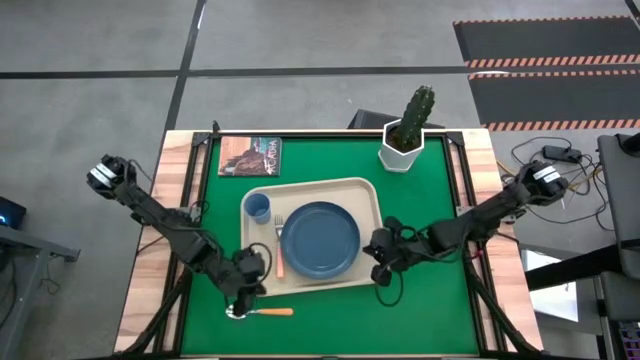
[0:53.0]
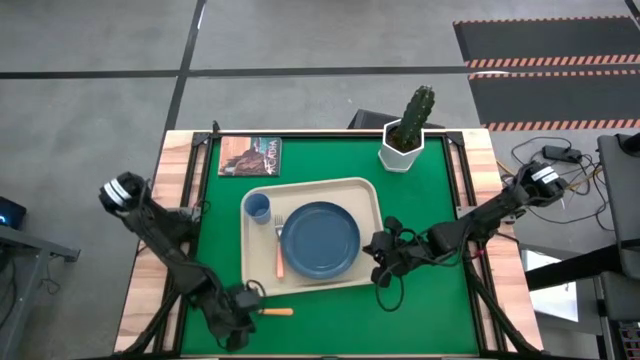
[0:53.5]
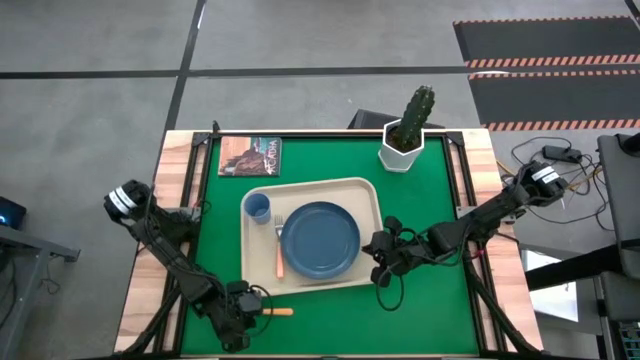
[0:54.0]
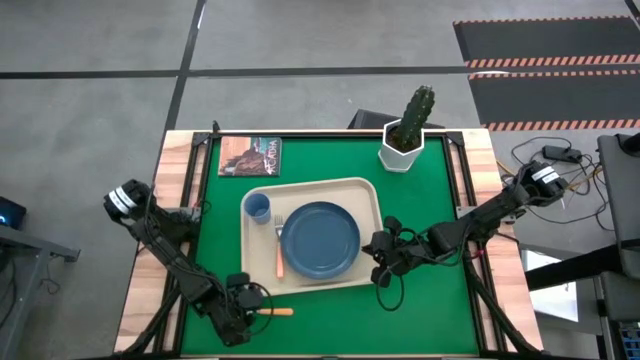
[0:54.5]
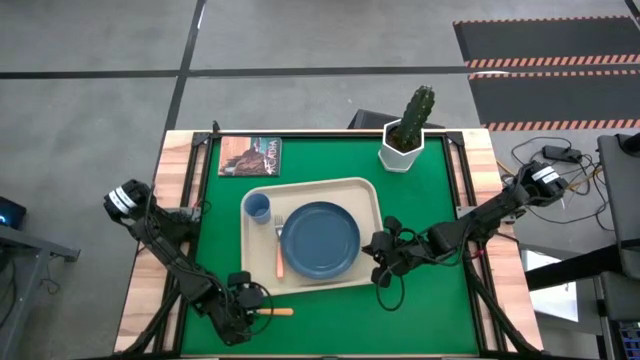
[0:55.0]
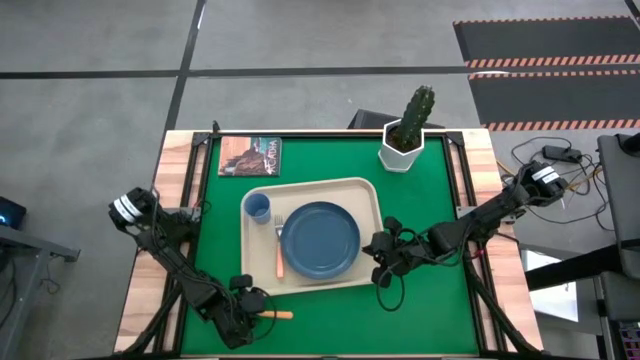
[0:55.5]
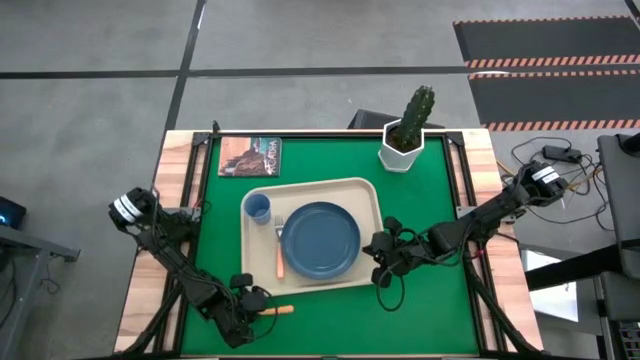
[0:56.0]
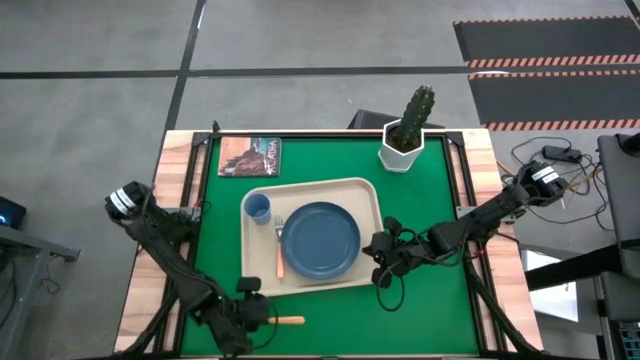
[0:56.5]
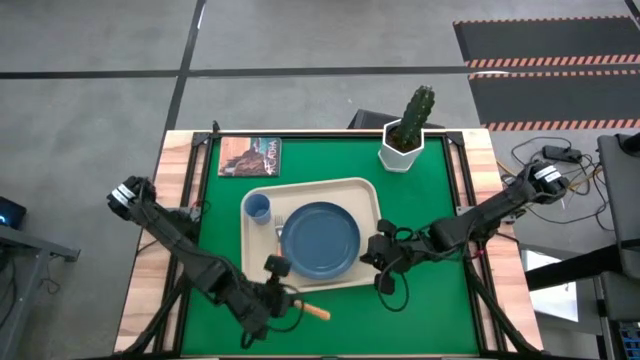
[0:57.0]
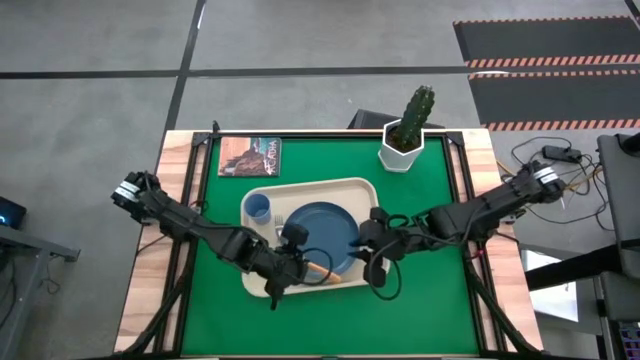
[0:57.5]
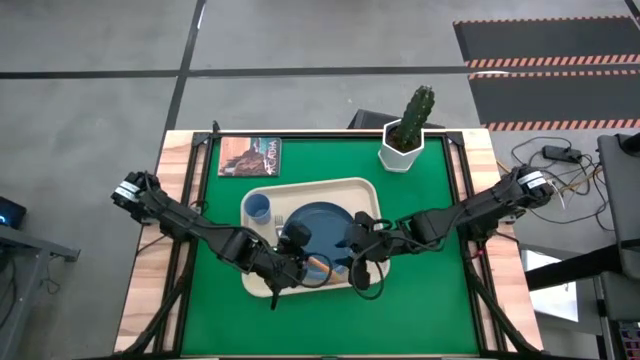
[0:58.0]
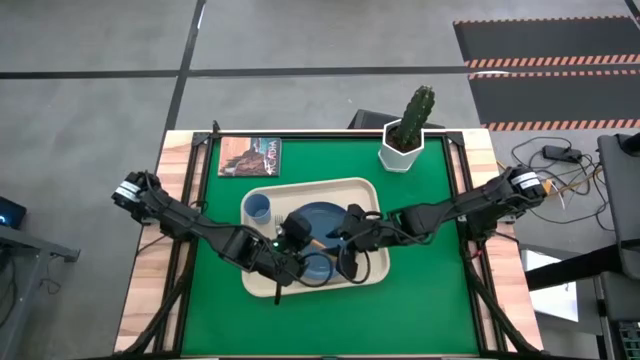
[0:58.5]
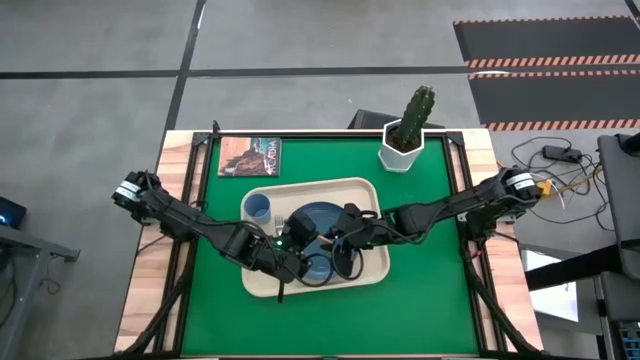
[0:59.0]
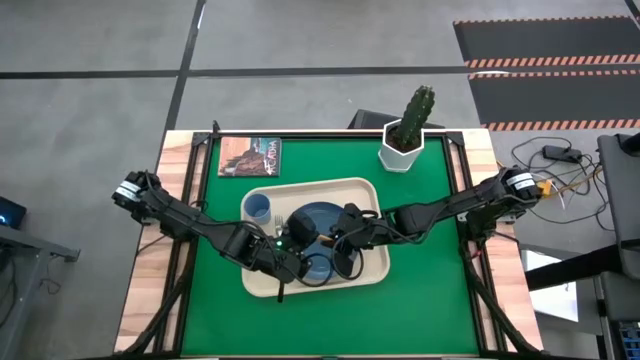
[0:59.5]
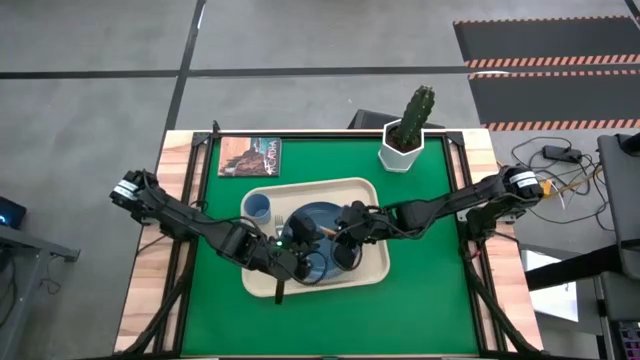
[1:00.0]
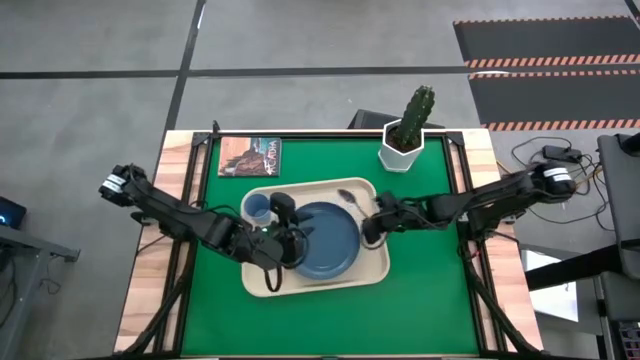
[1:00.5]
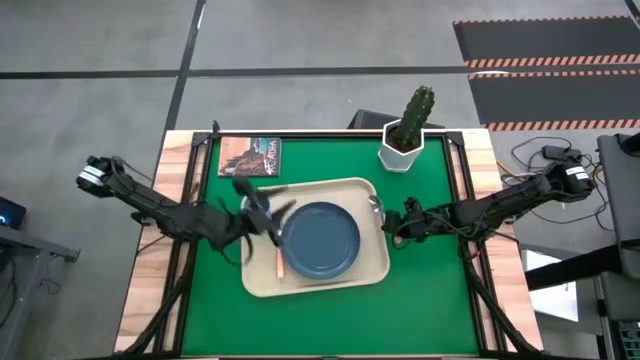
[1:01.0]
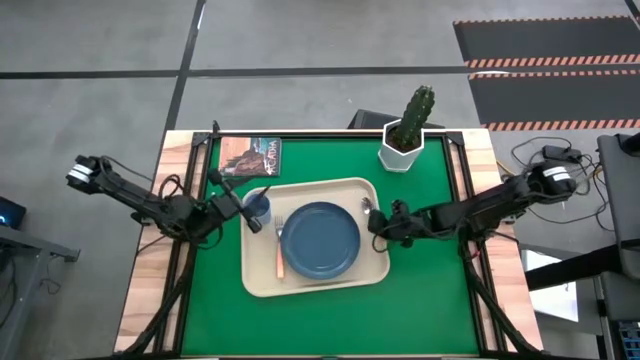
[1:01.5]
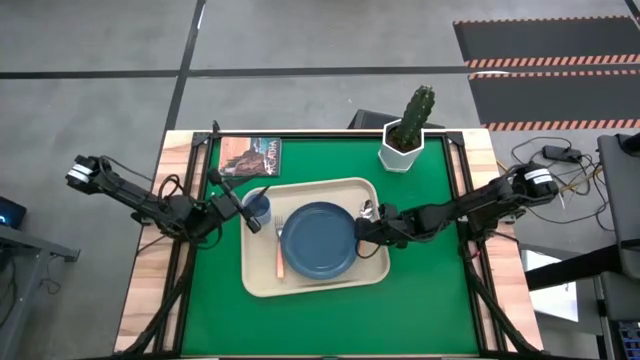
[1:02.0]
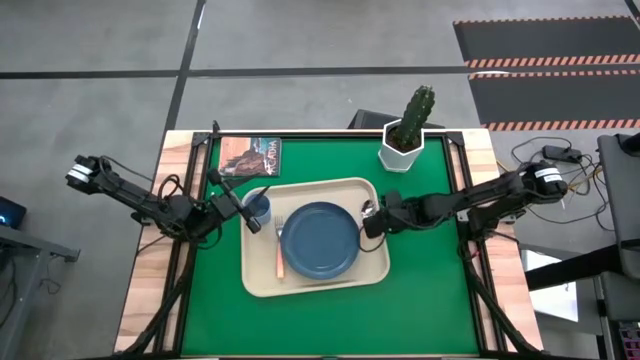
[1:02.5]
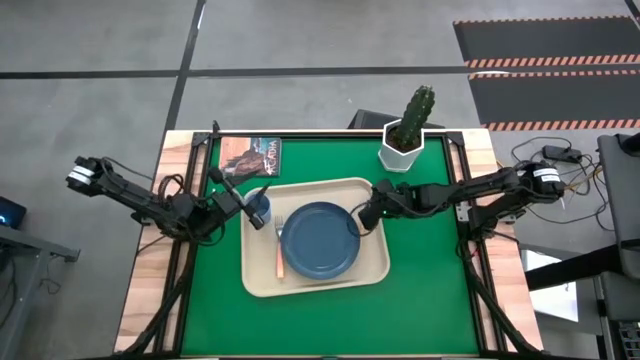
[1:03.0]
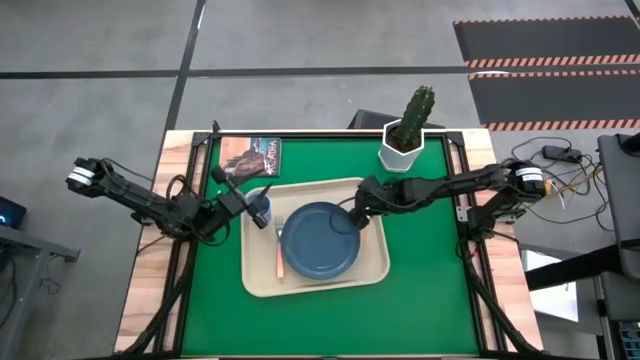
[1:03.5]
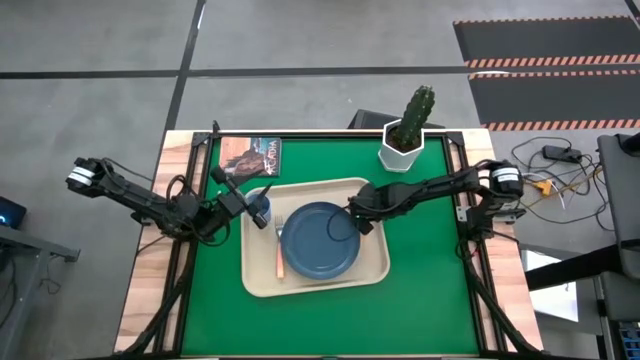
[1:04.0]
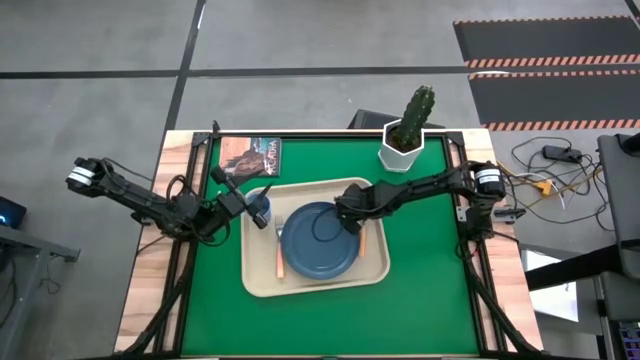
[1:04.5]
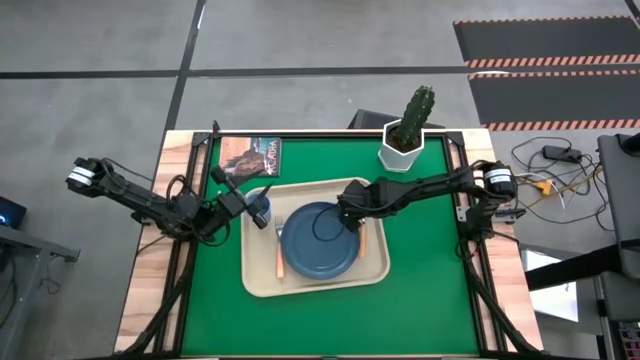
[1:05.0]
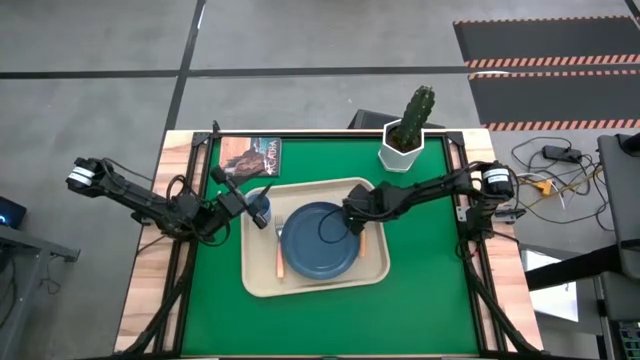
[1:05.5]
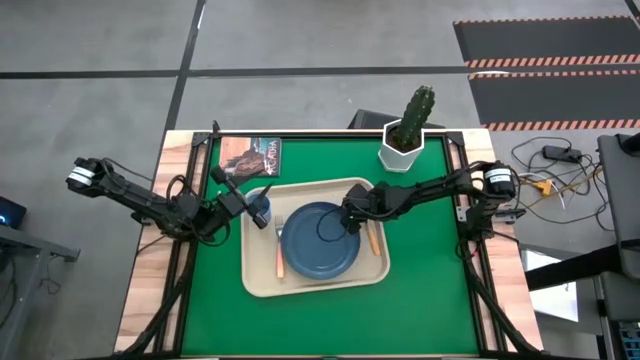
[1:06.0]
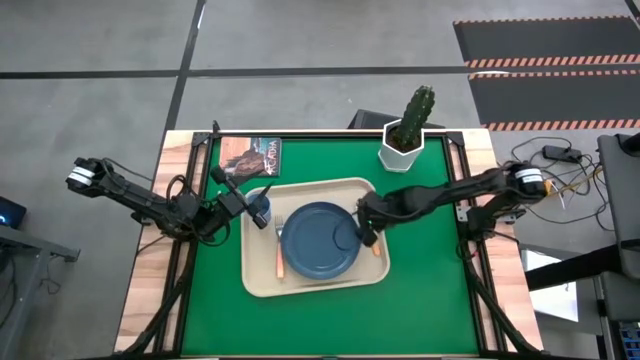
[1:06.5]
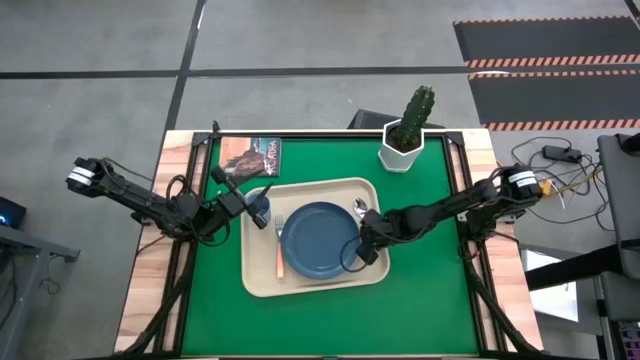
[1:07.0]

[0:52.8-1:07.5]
Task: Pick and place plate/cup/fork/spoon on tray
Put the yellow spoon on the white serving tray on the right of the blue plate

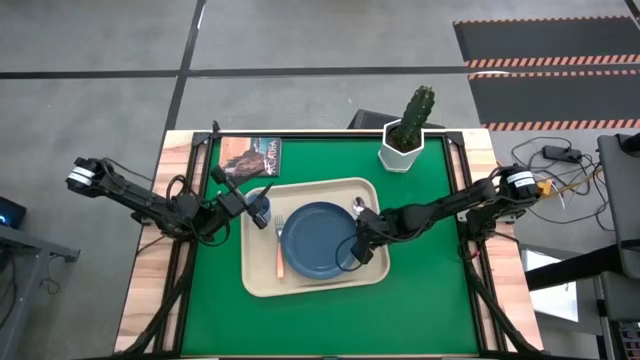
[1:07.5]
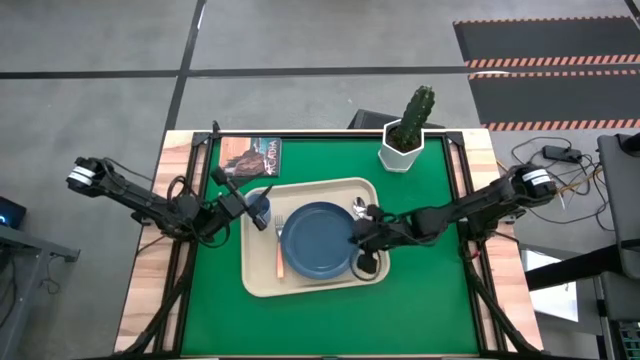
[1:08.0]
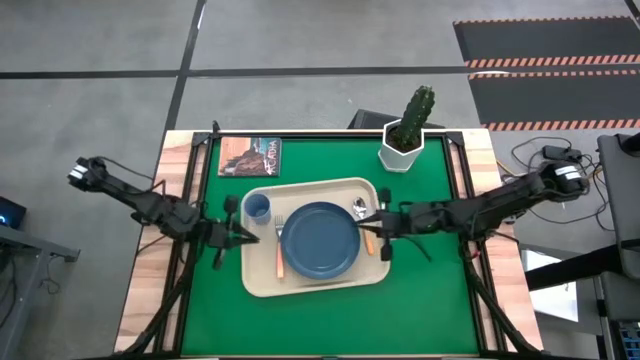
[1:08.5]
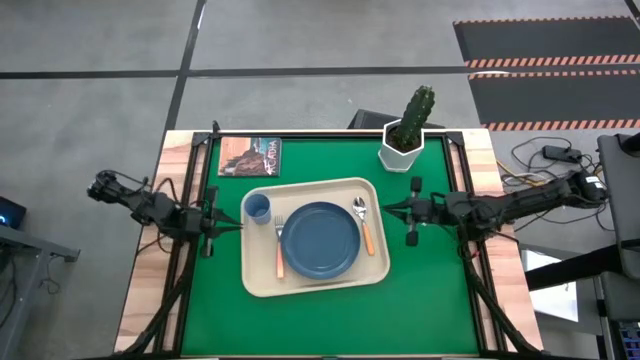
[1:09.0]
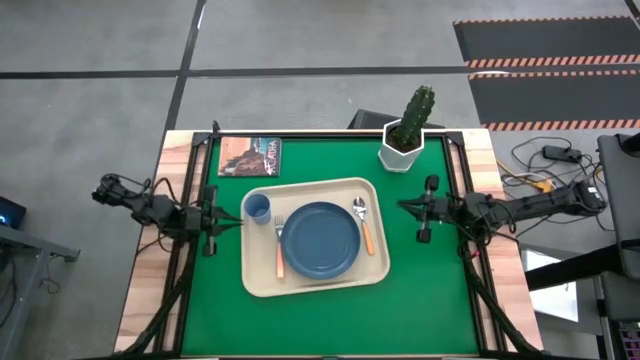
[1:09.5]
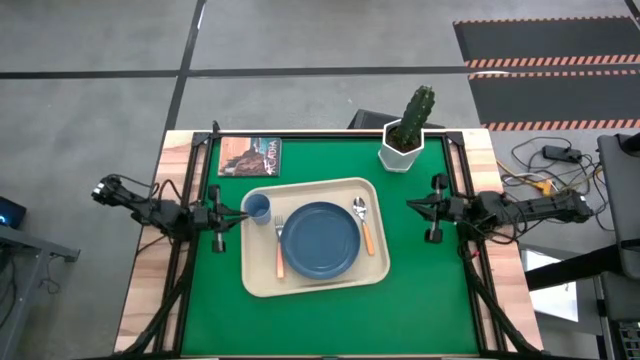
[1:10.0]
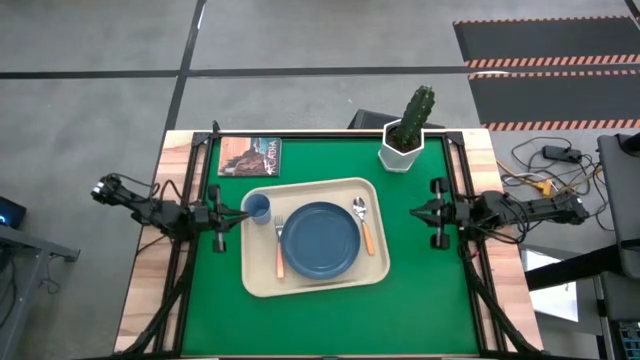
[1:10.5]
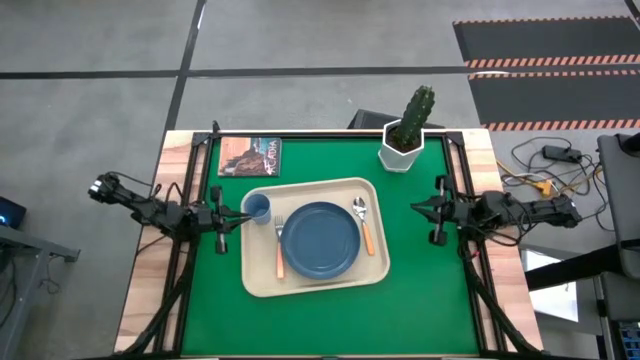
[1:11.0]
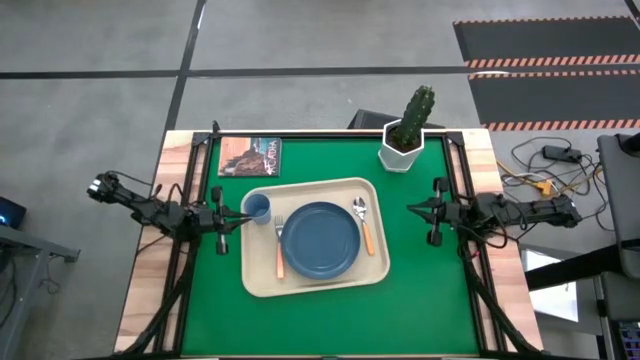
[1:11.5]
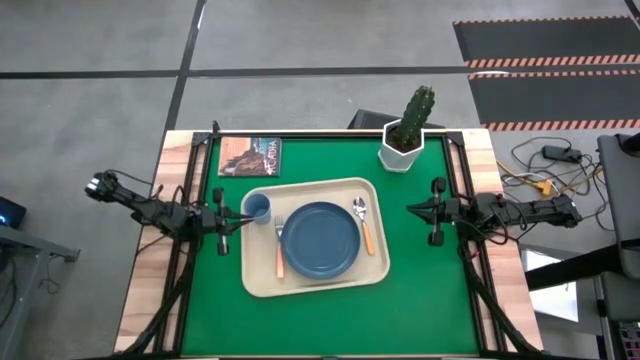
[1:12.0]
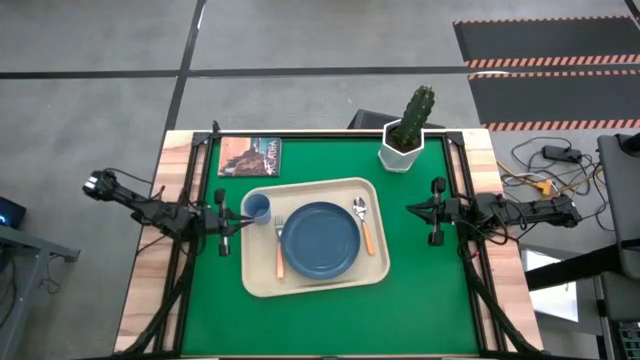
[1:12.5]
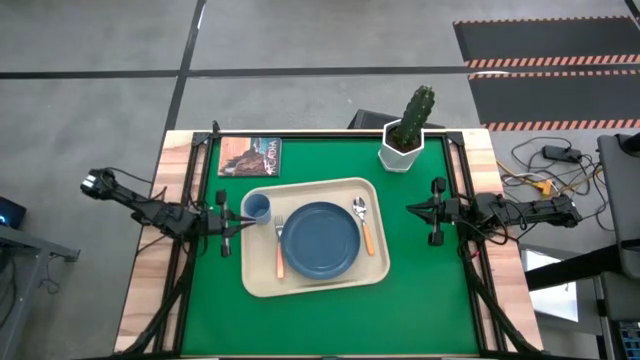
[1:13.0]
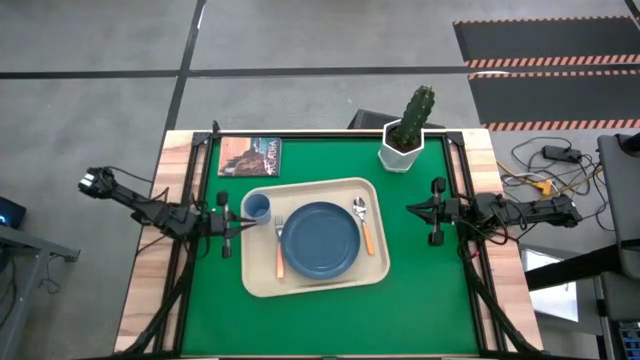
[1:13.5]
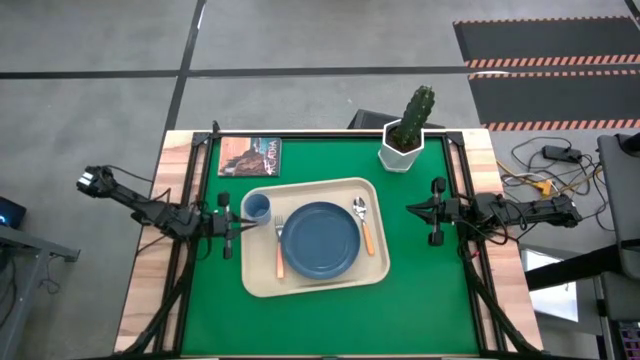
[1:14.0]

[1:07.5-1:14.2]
Return to Home Position
